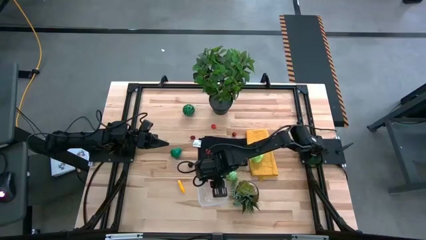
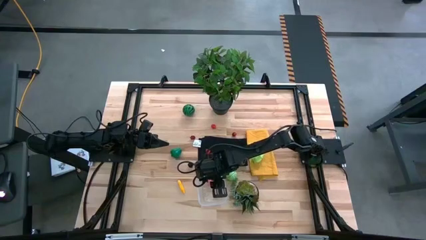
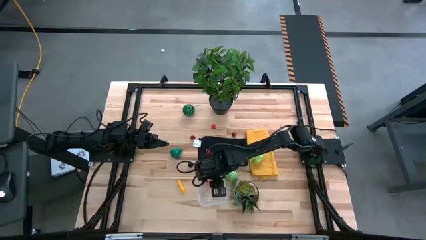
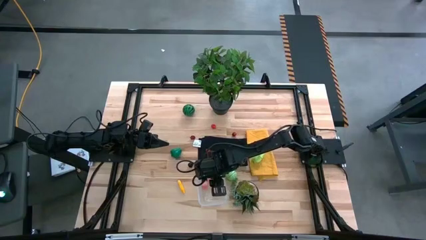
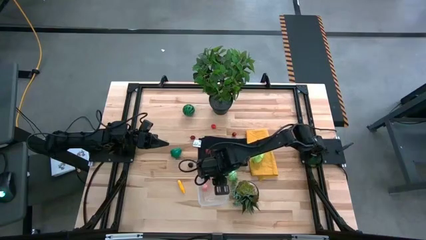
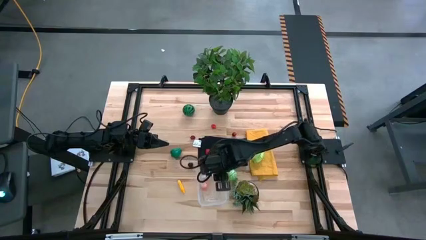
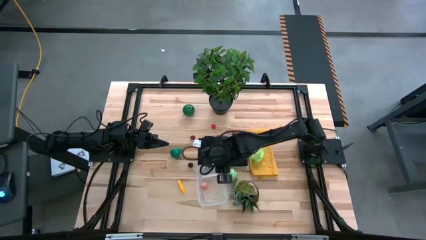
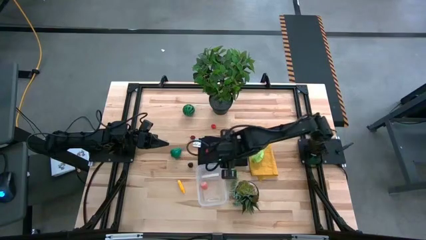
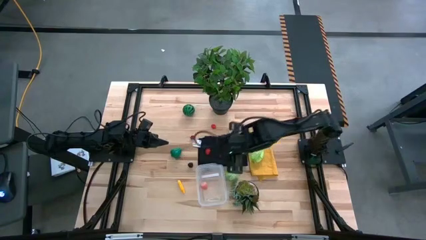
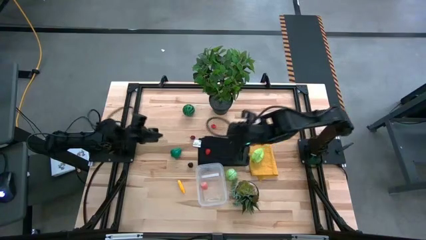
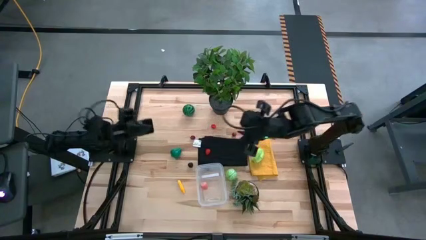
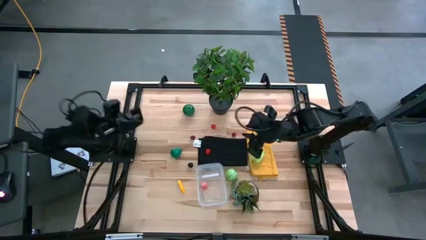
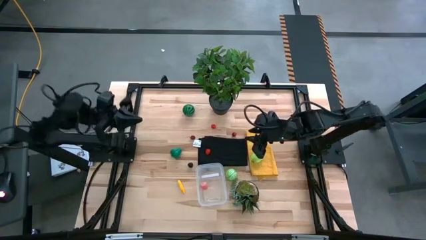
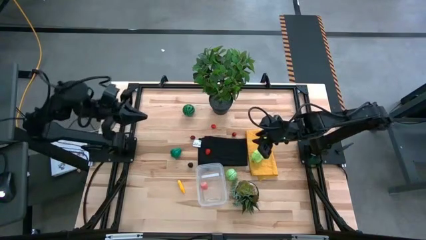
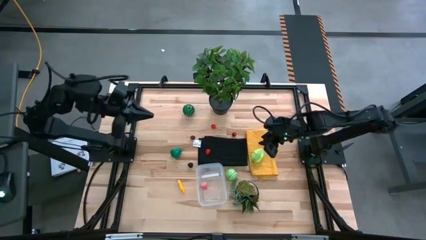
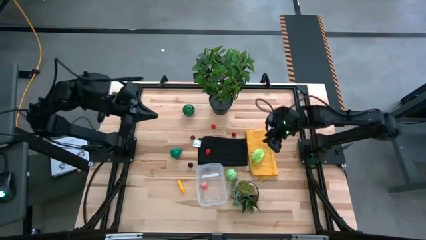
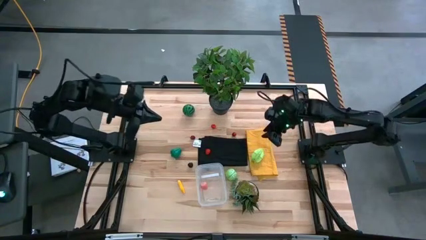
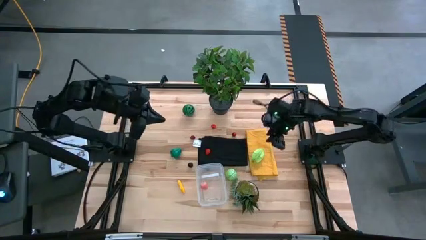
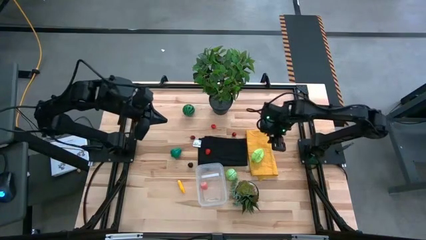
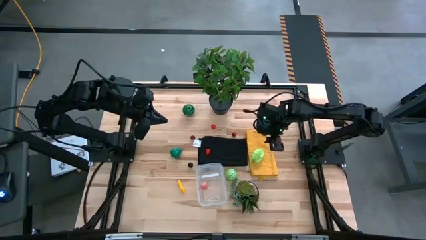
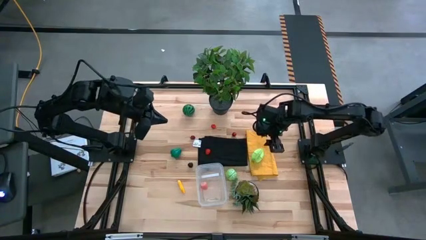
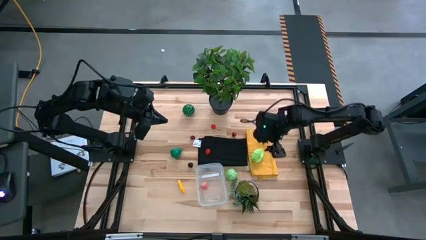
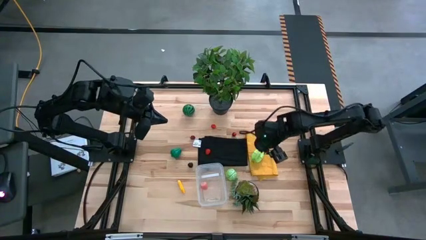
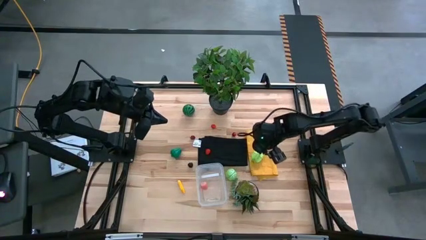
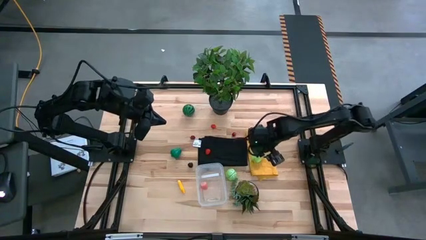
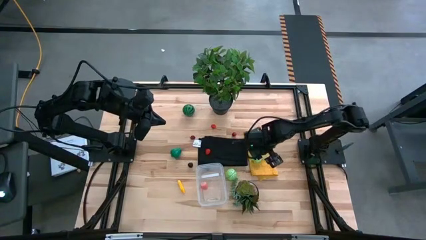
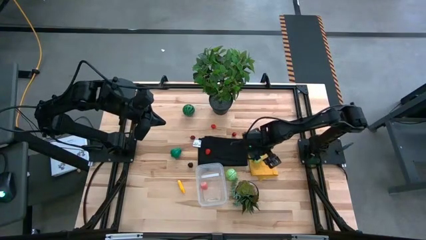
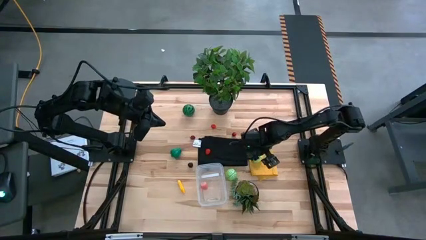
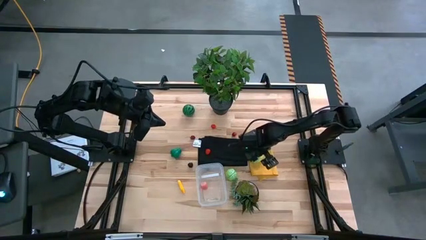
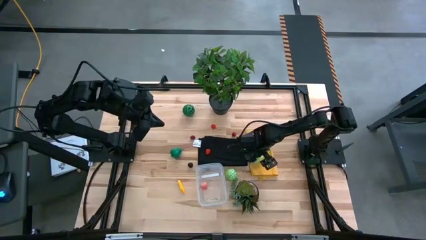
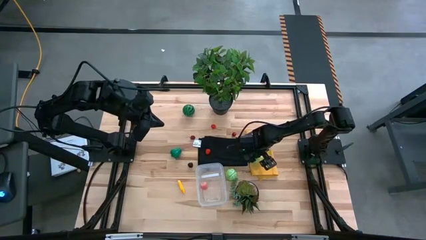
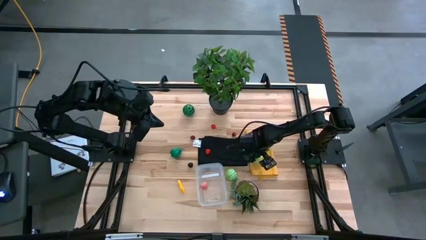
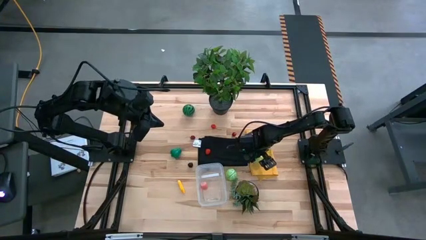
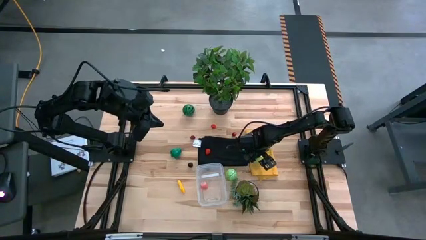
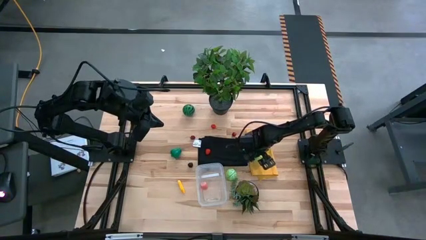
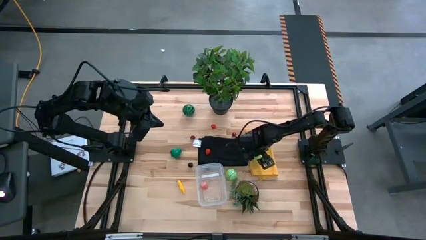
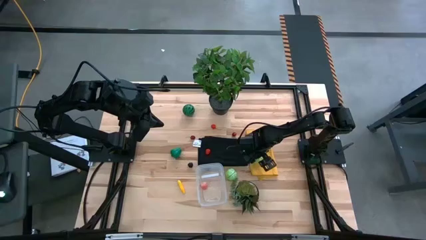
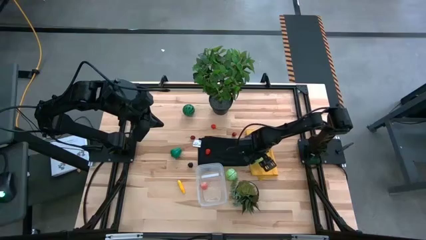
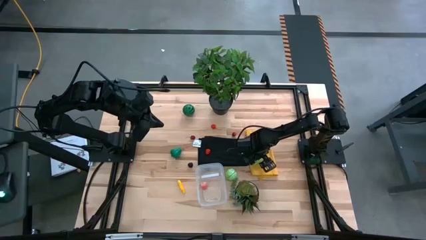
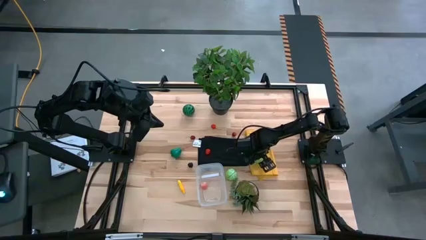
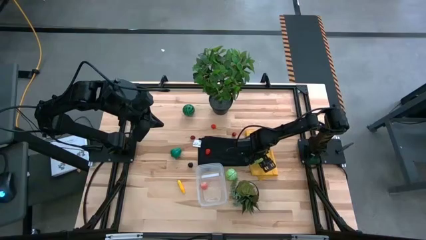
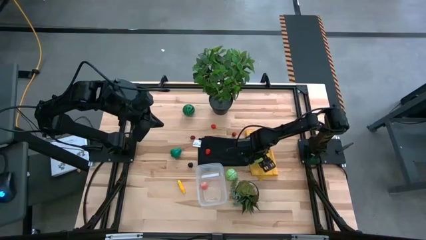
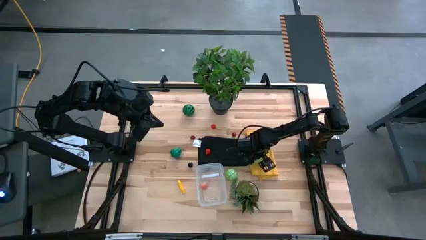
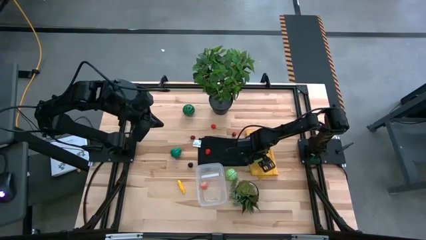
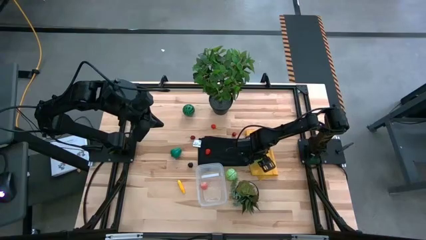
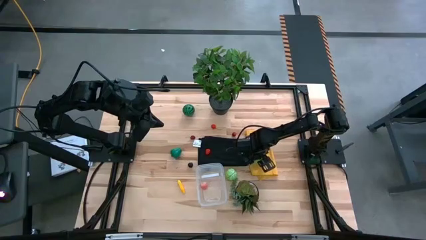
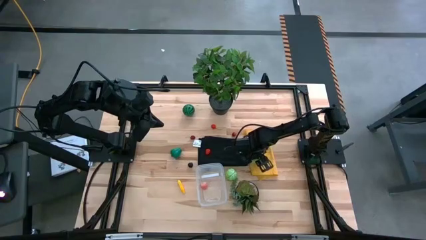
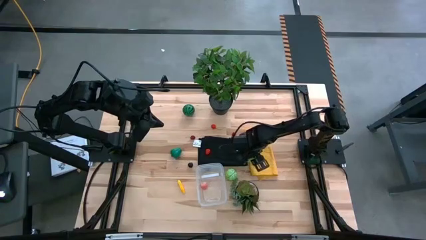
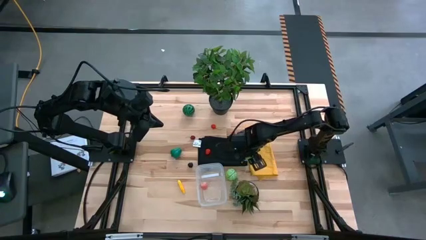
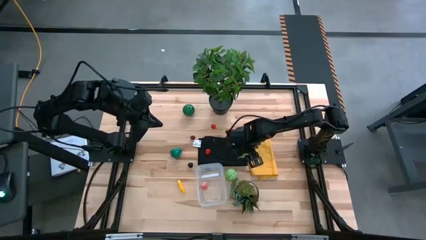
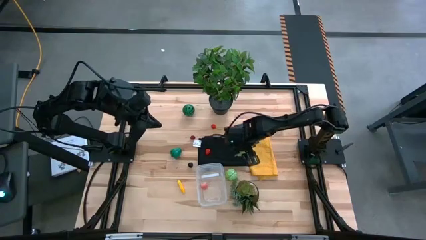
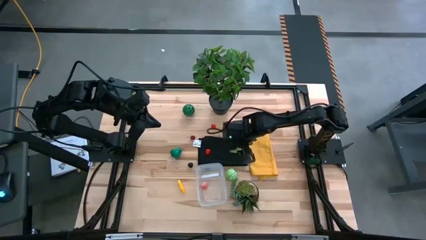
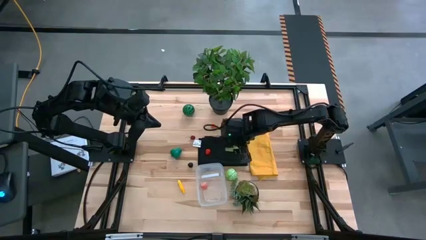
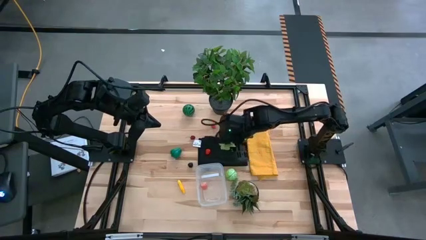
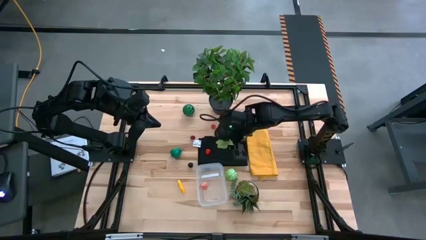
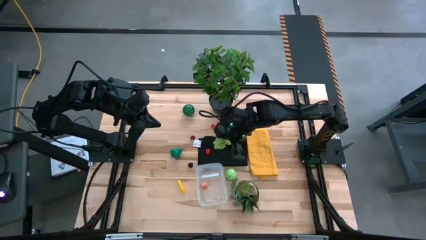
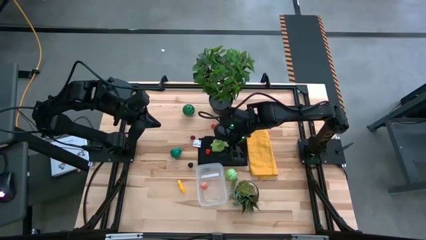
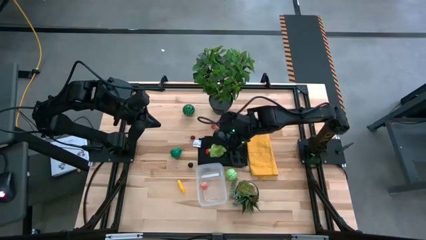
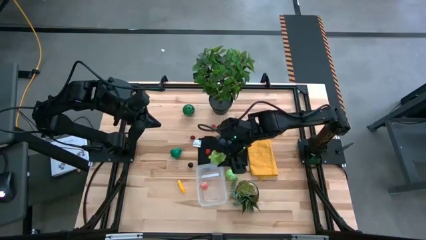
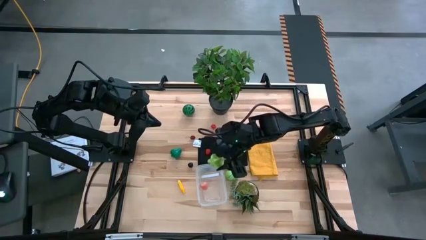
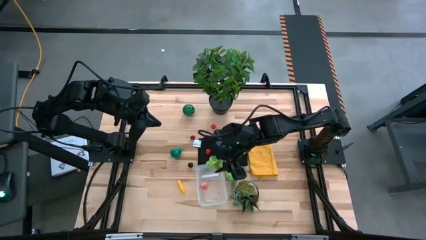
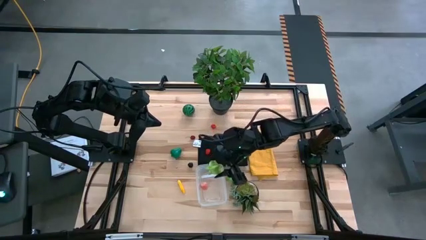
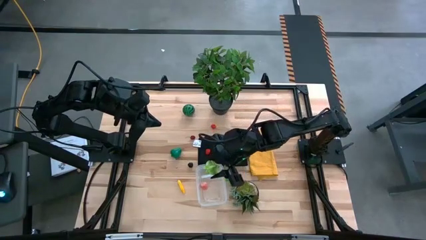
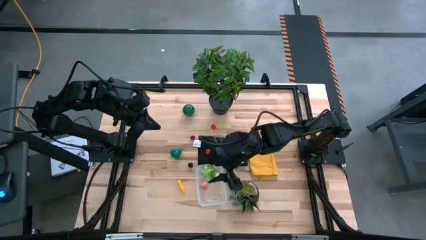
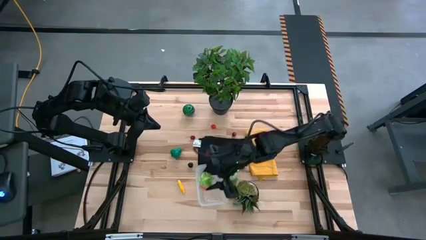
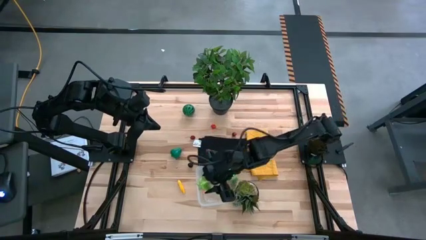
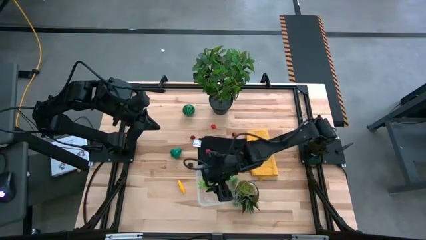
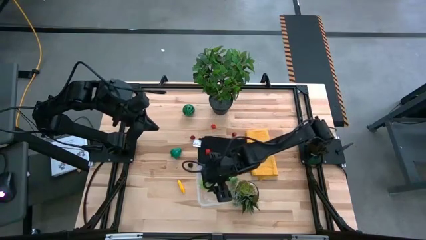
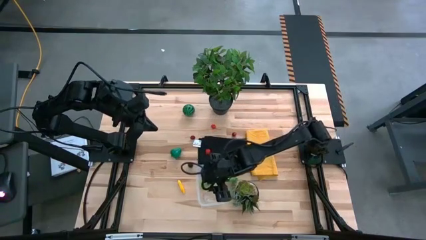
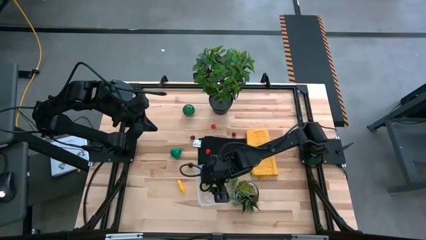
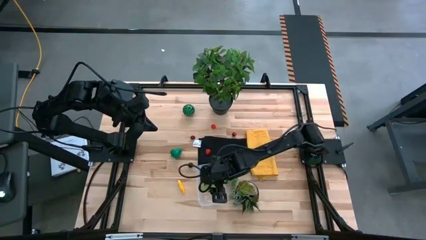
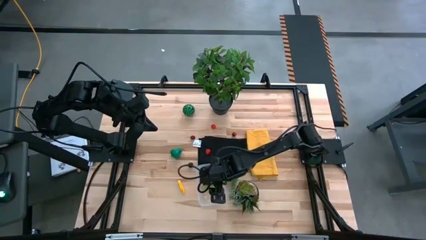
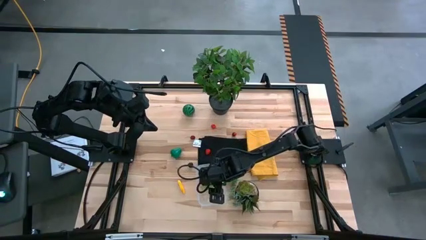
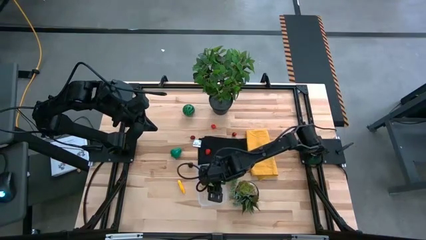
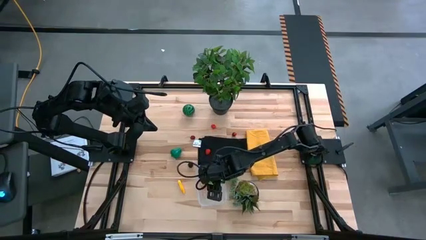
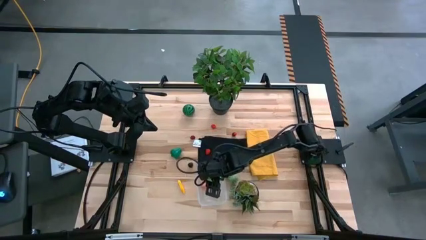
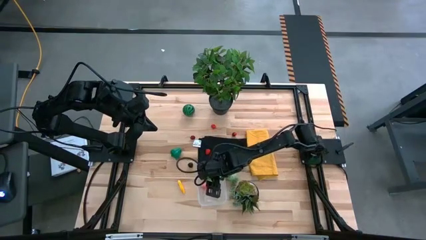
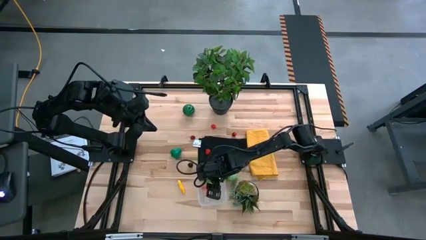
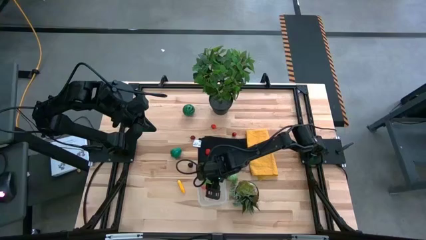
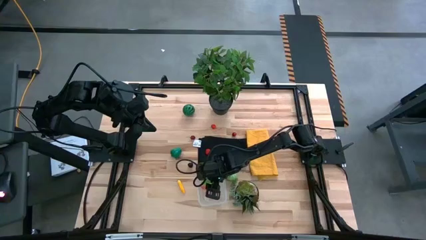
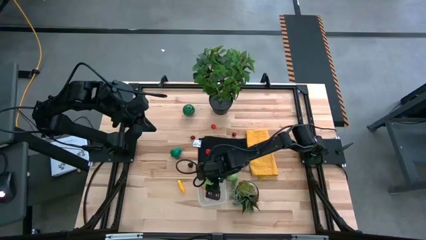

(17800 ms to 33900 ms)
Task: Pick and placing Produce into tupperware
Put the starfruit into the bin
